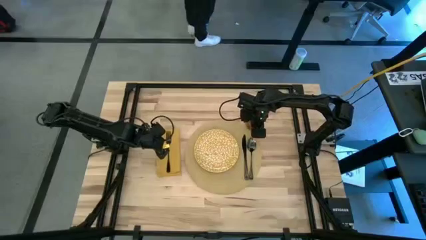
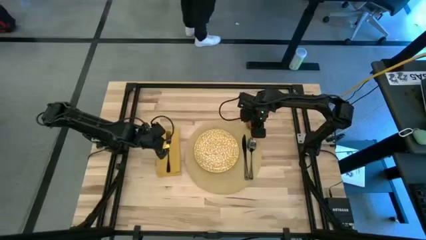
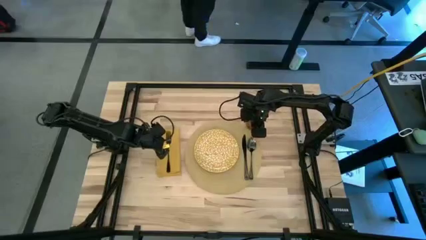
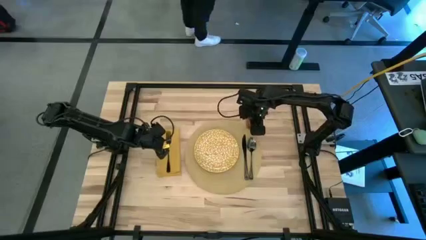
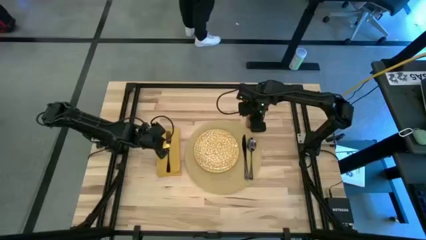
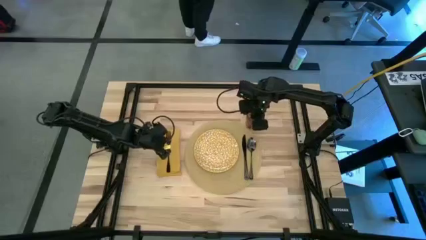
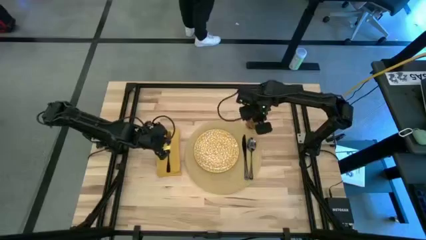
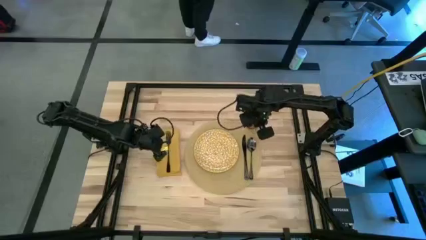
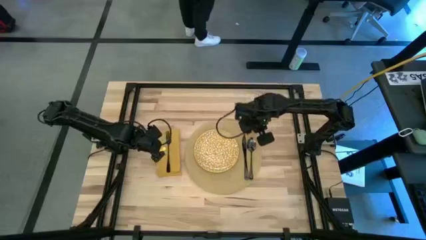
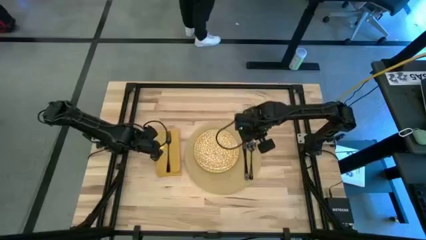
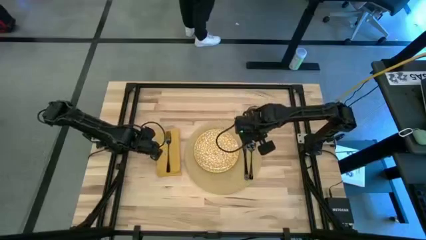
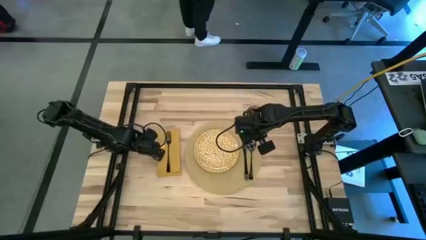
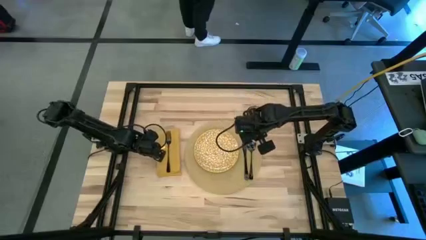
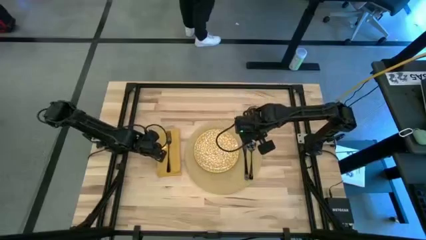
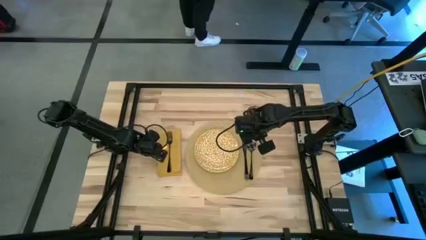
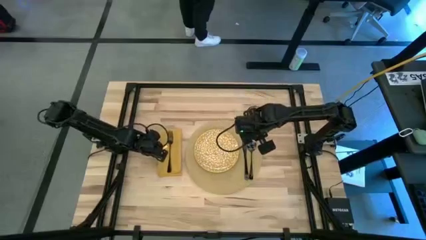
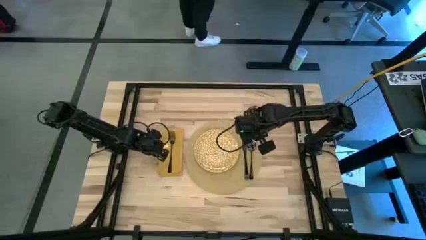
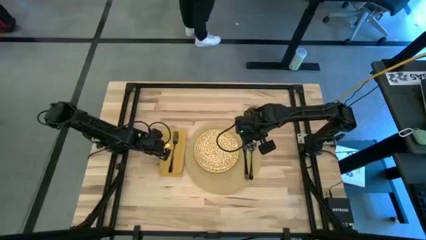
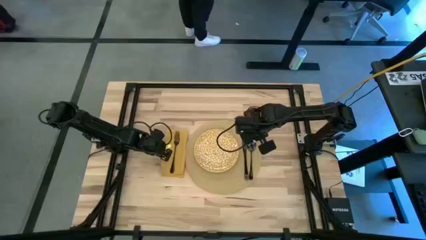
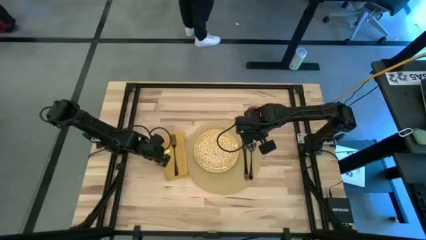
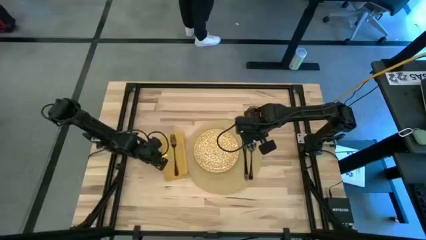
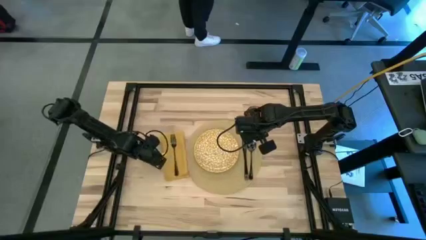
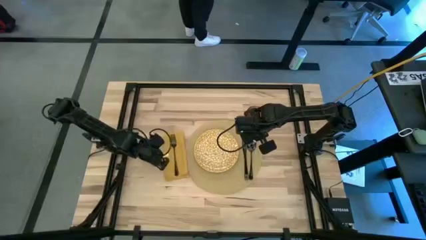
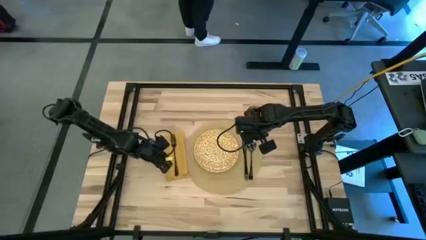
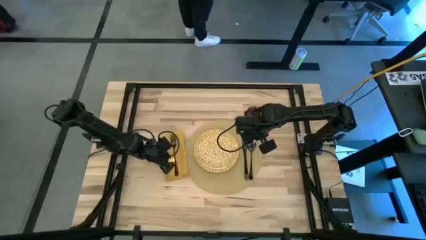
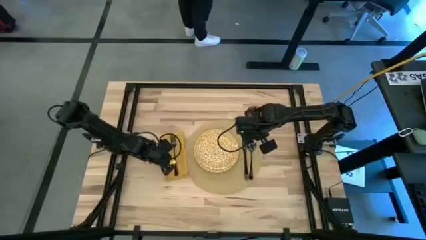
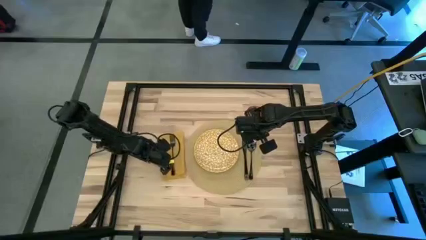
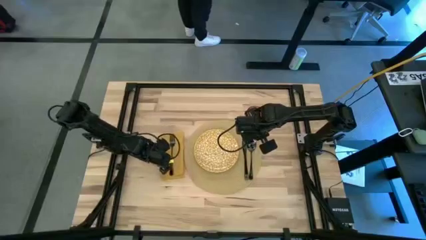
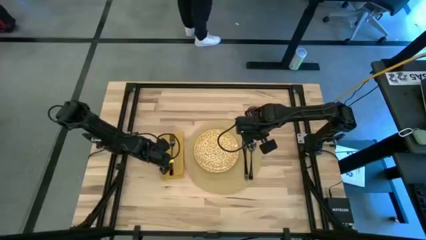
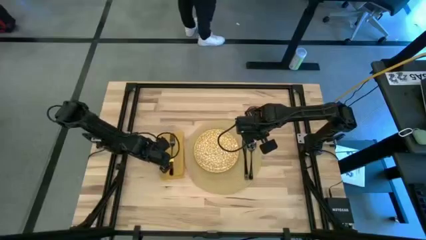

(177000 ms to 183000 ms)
Task: Set table place
Adjust the yellow table napkin

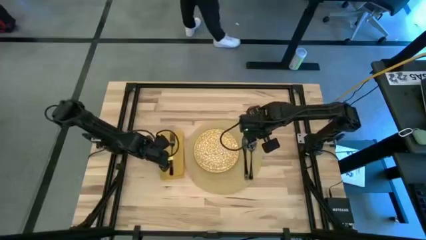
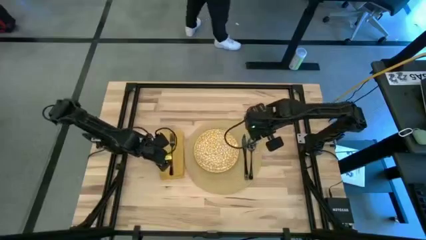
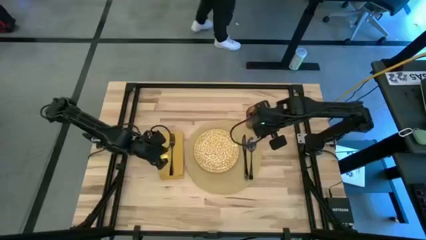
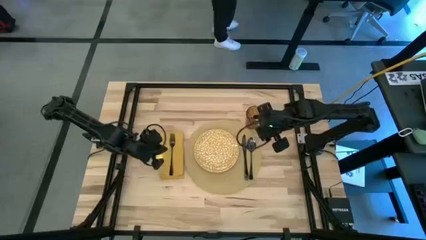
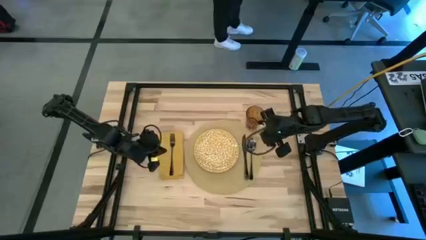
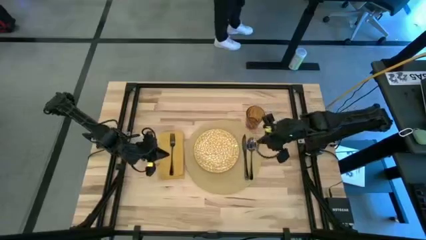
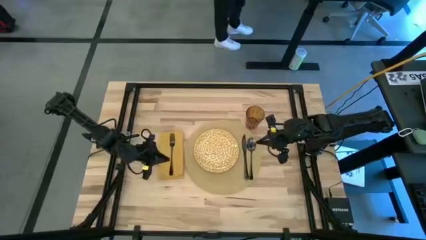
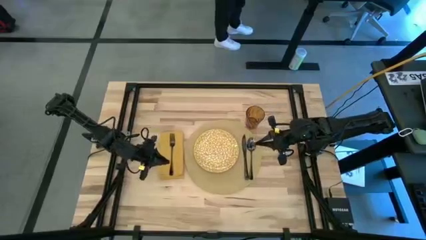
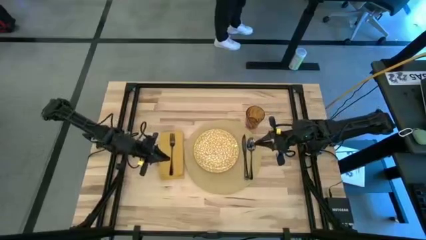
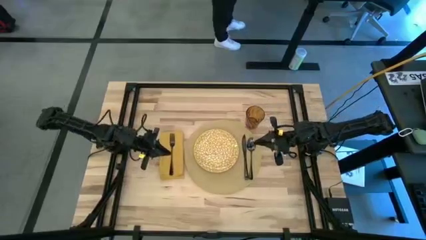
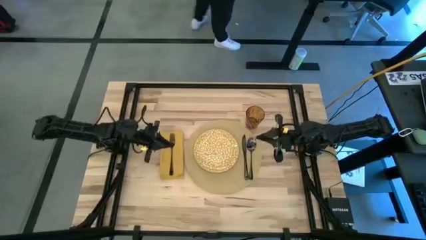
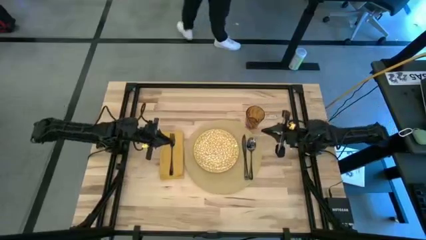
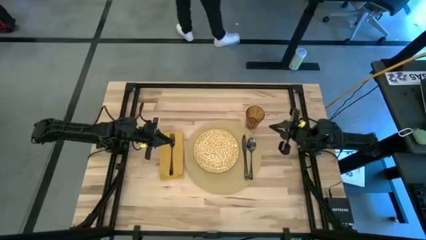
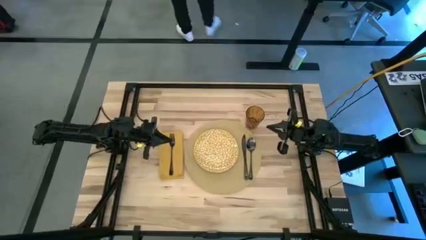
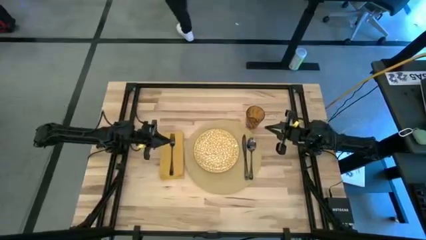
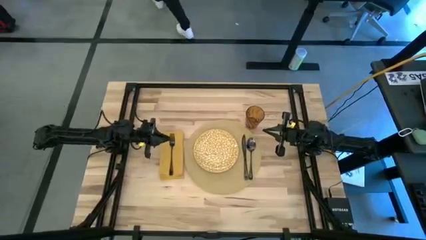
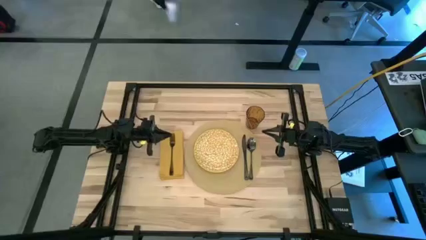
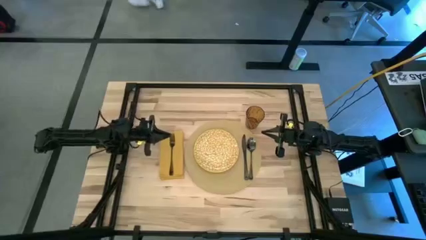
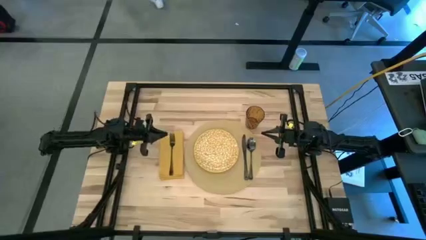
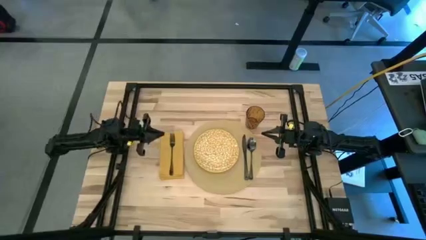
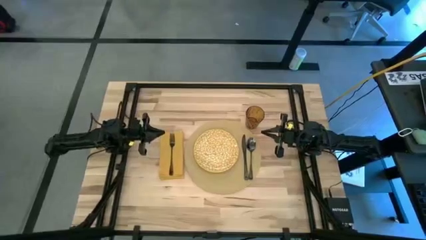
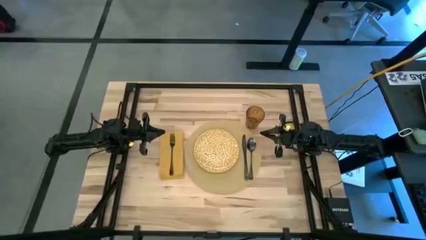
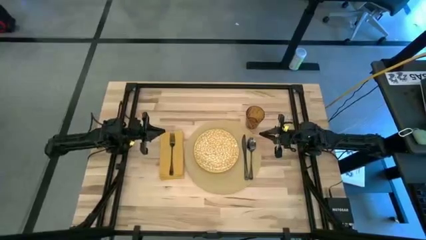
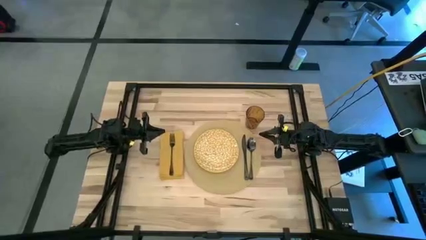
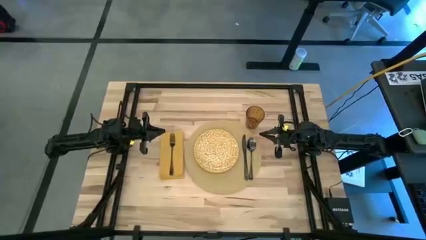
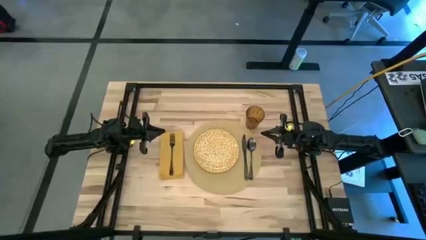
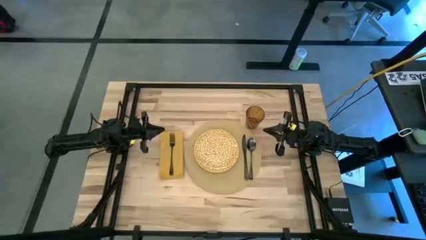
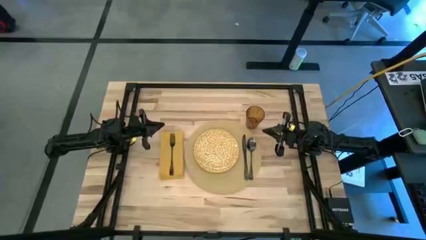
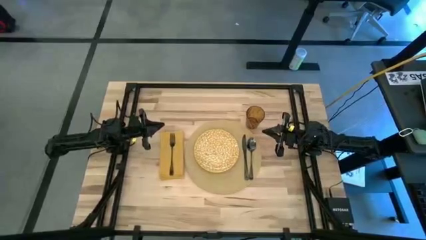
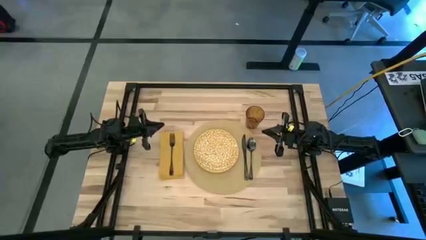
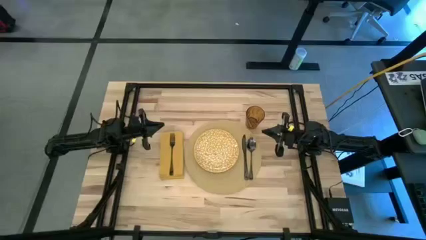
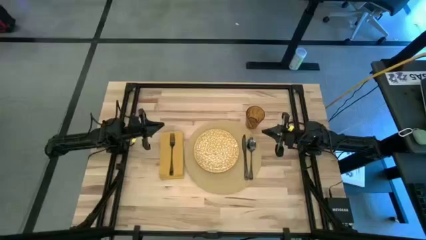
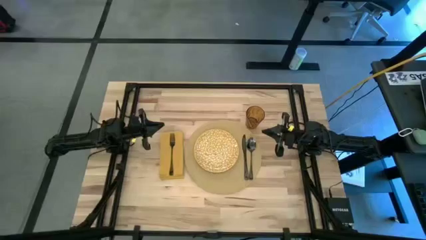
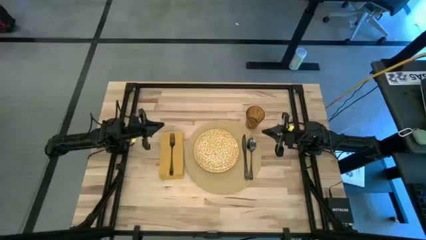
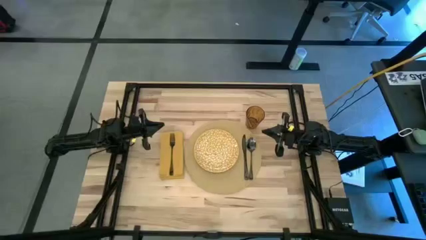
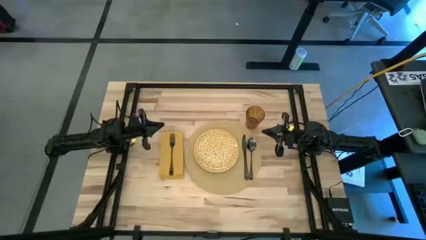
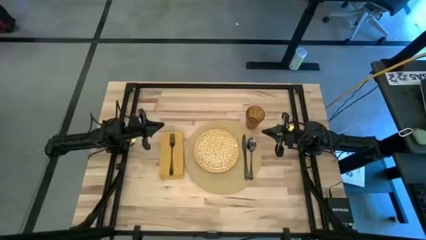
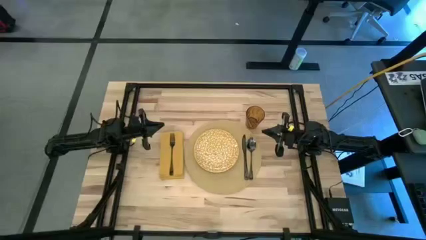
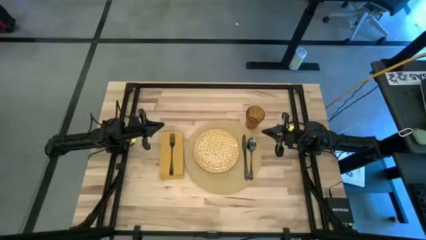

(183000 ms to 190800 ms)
Return to Home Position
